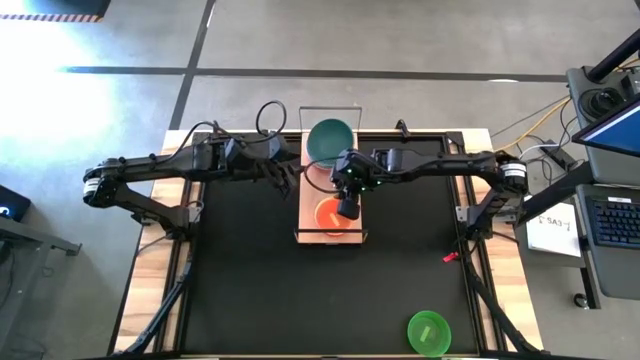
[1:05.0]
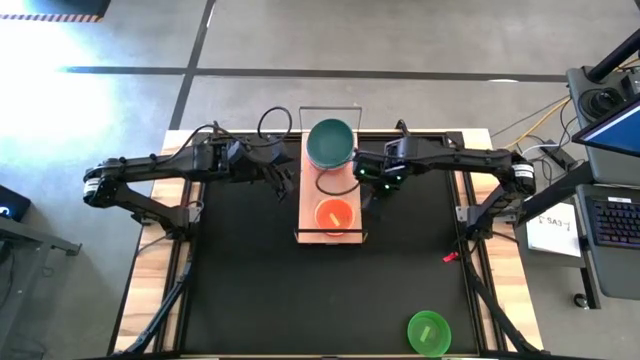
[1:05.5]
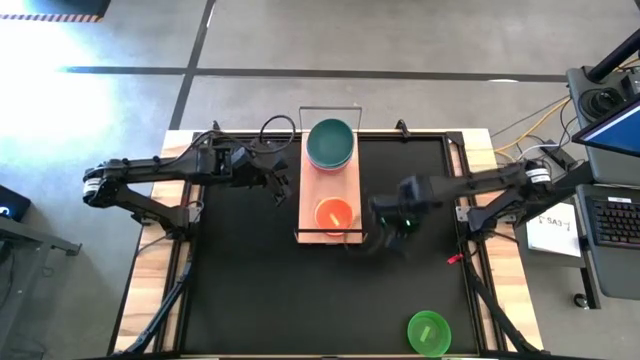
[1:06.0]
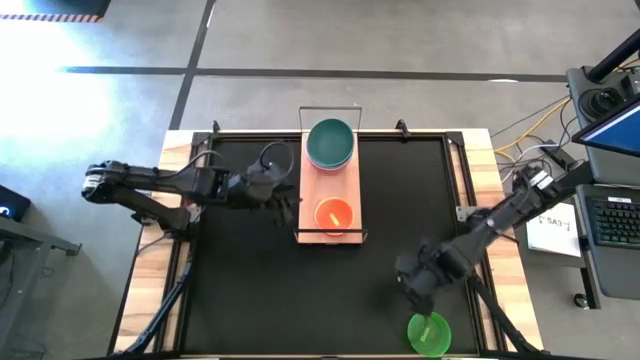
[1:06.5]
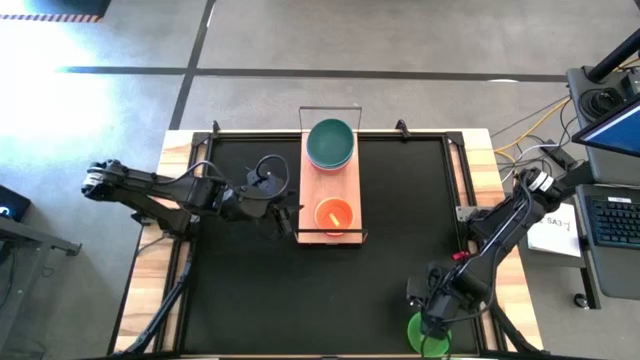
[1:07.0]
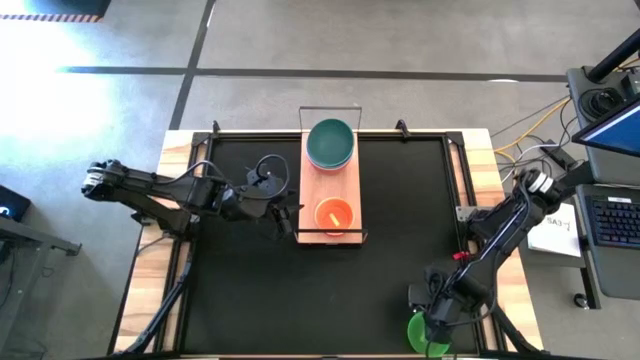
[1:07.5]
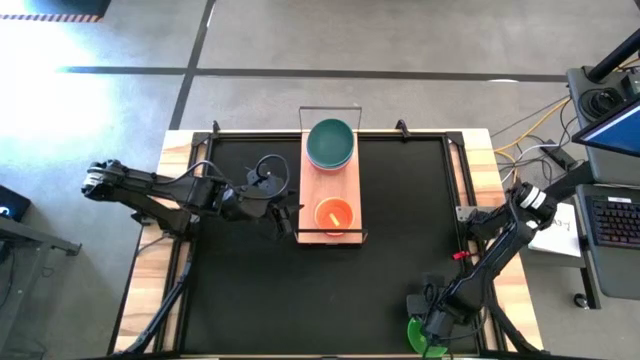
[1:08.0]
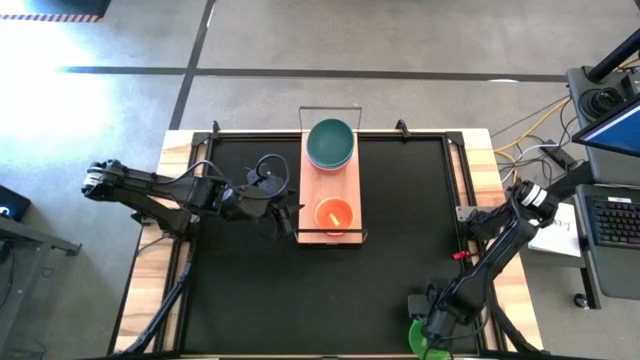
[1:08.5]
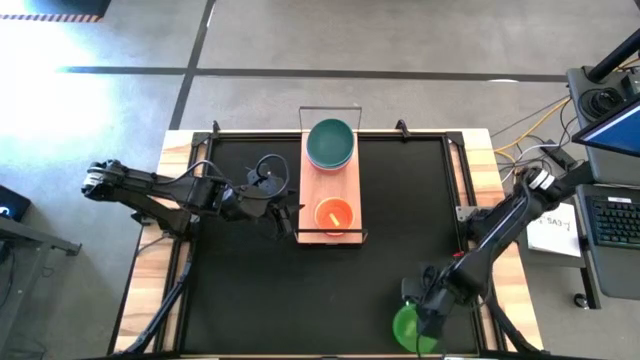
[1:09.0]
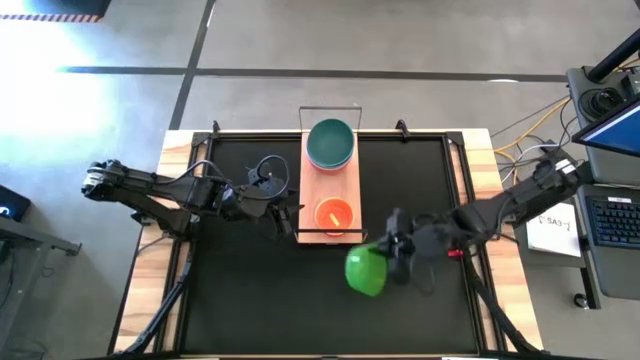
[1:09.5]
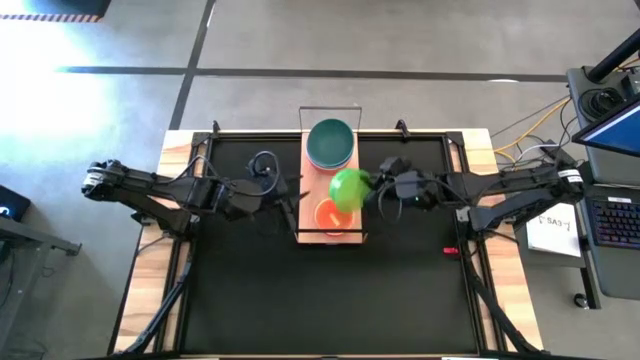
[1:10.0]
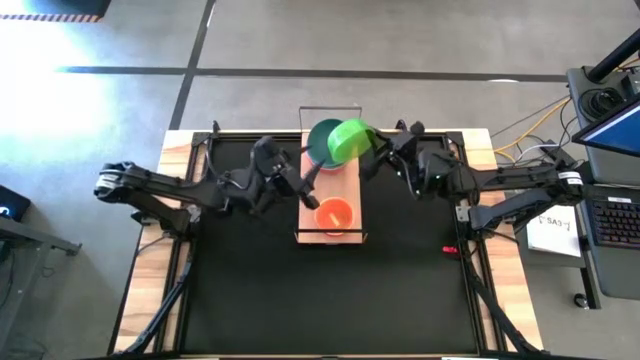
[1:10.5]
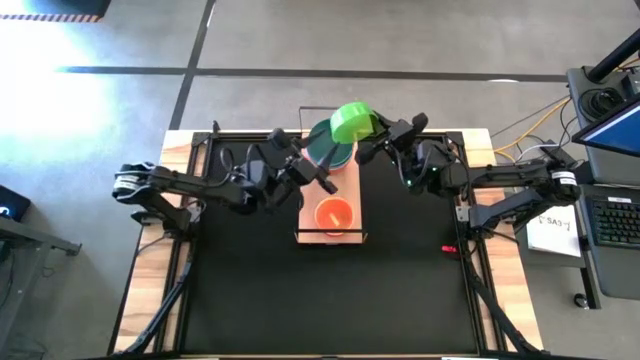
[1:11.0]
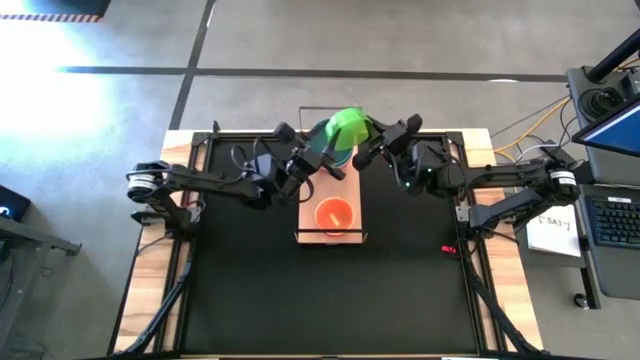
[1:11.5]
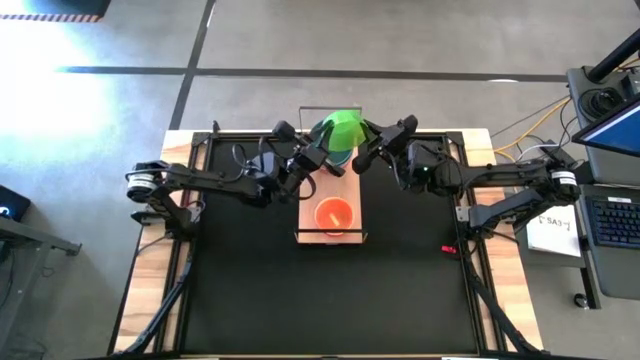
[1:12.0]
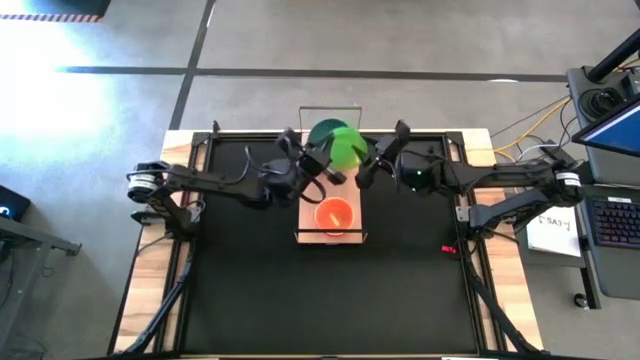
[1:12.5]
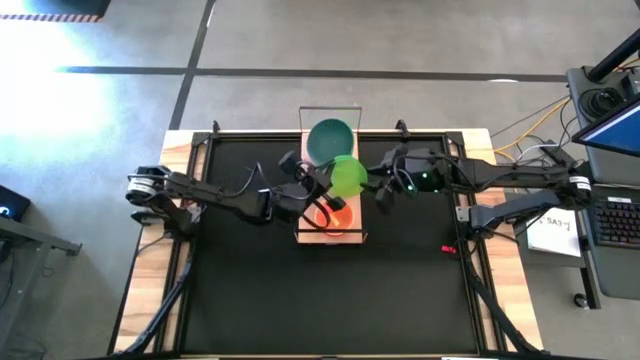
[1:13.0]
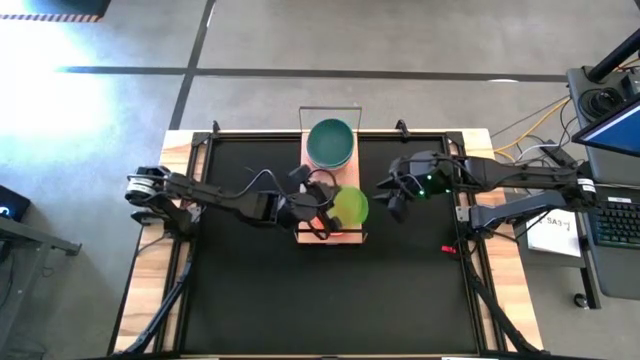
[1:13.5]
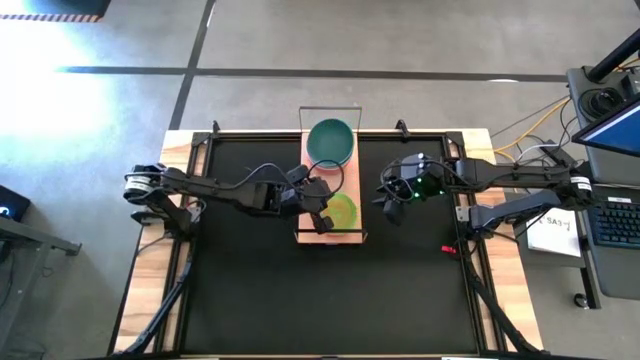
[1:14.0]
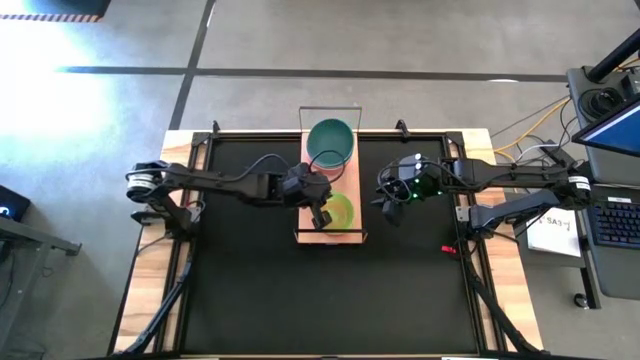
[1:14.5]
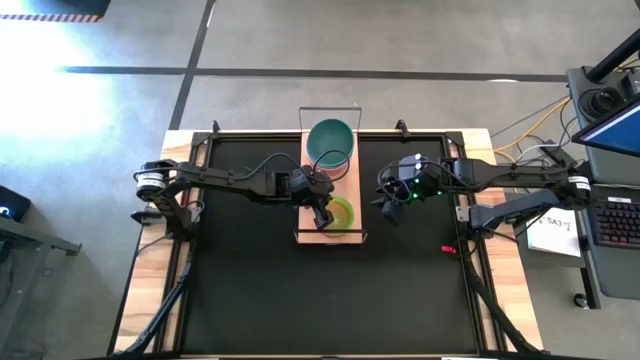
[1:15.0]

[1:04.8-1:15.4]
Task: Place and stack bowls onto a shelf
Stack the small green bowl on top of the small yellow bowl on the shelf

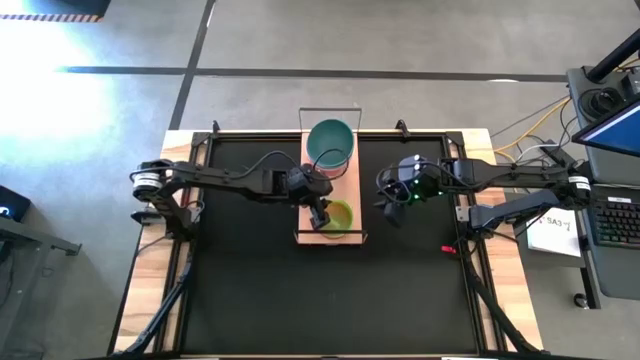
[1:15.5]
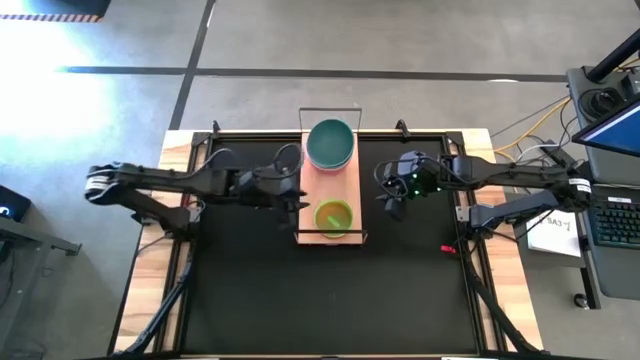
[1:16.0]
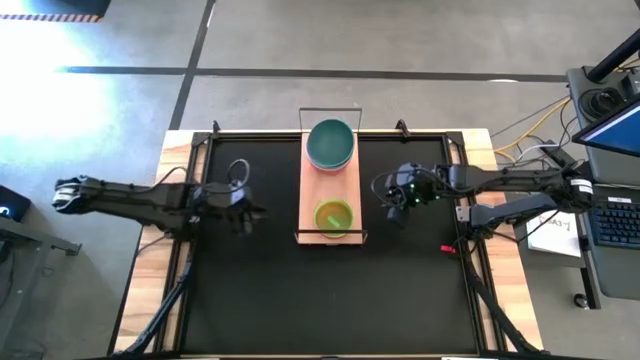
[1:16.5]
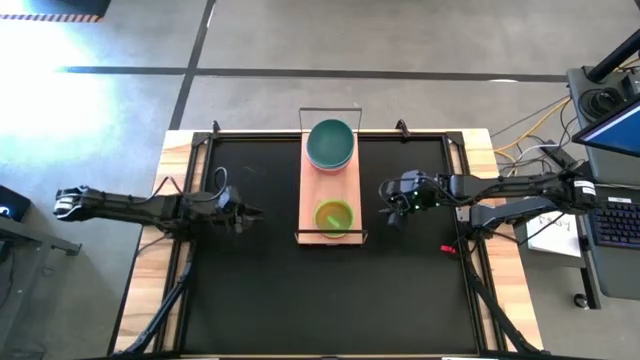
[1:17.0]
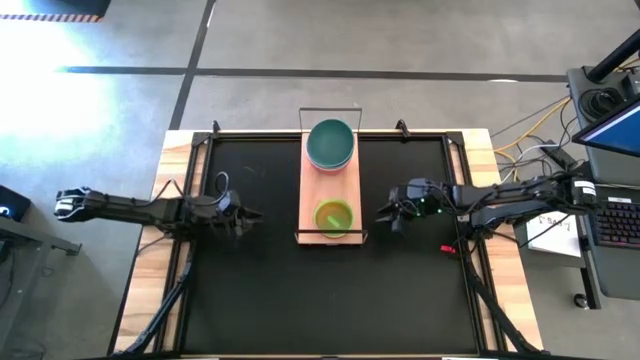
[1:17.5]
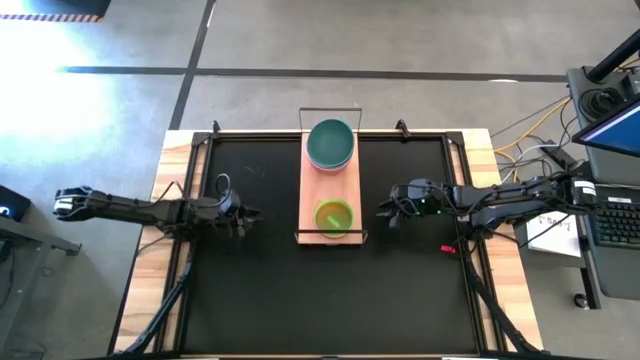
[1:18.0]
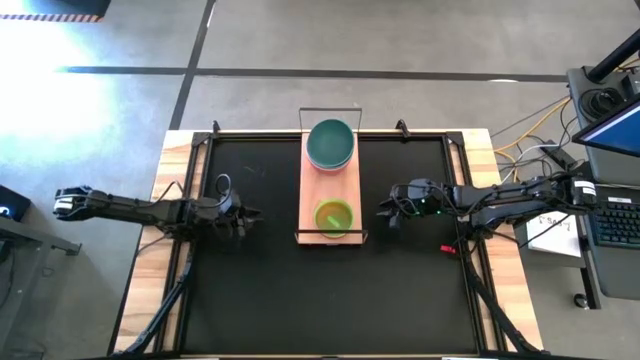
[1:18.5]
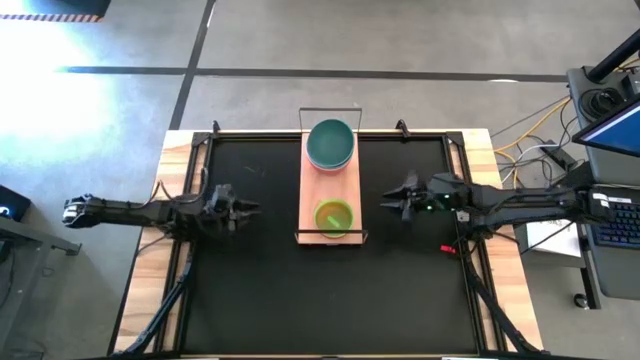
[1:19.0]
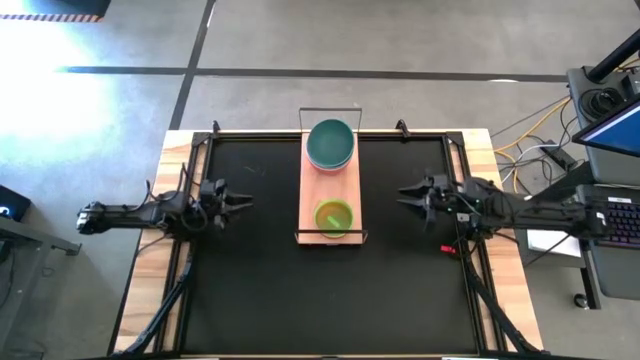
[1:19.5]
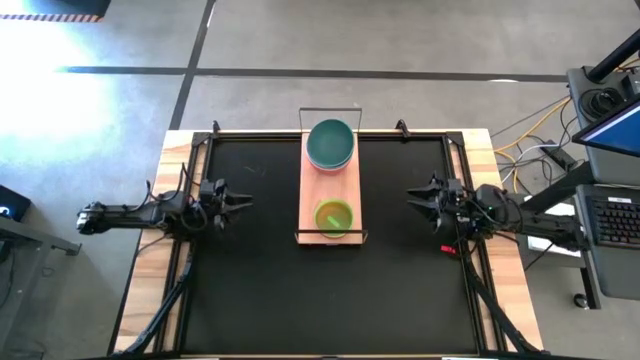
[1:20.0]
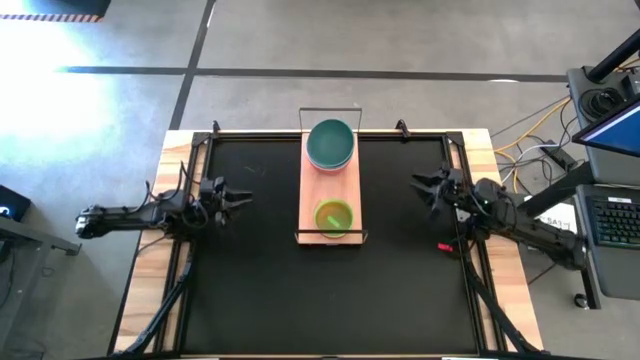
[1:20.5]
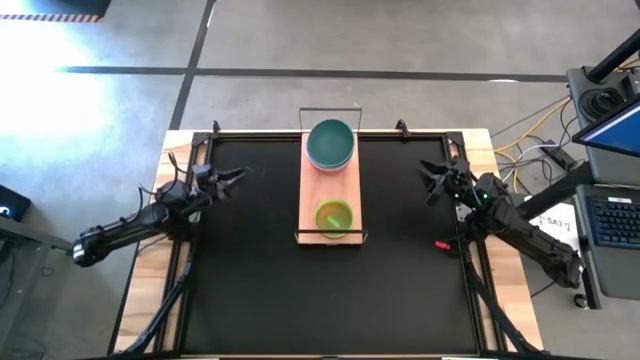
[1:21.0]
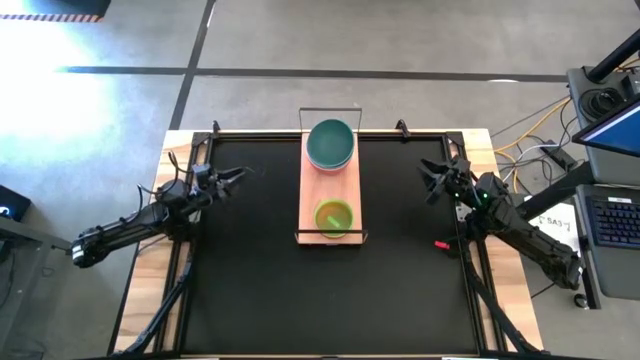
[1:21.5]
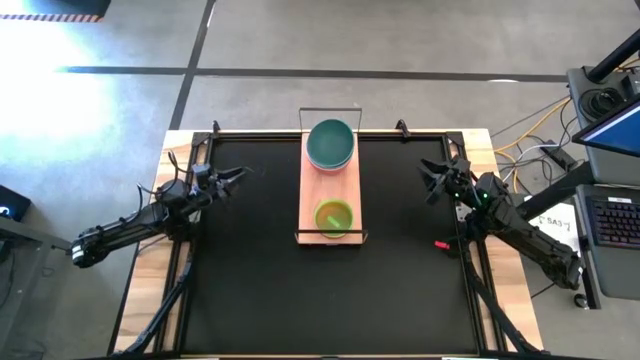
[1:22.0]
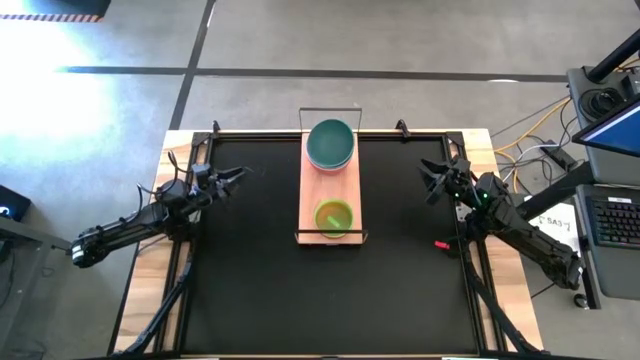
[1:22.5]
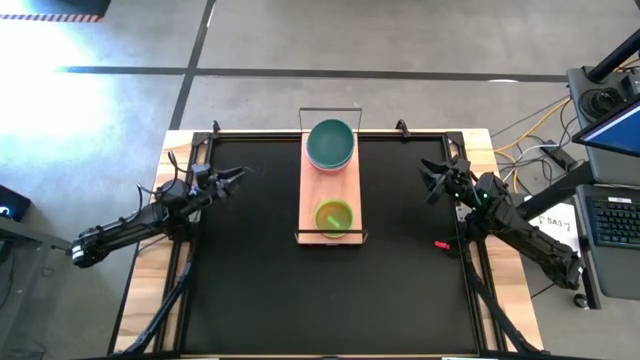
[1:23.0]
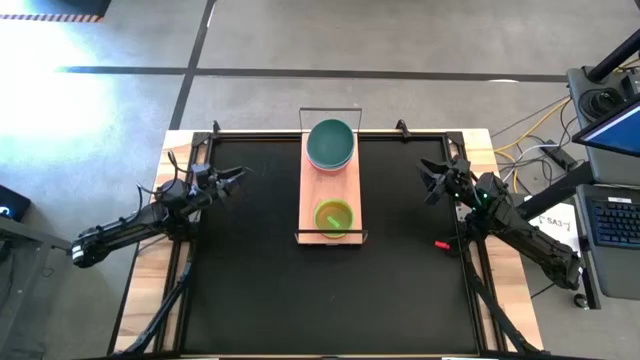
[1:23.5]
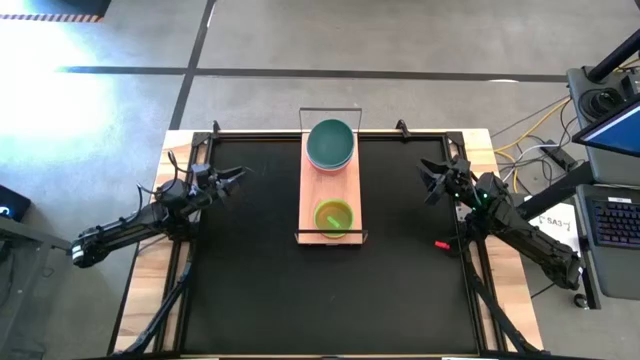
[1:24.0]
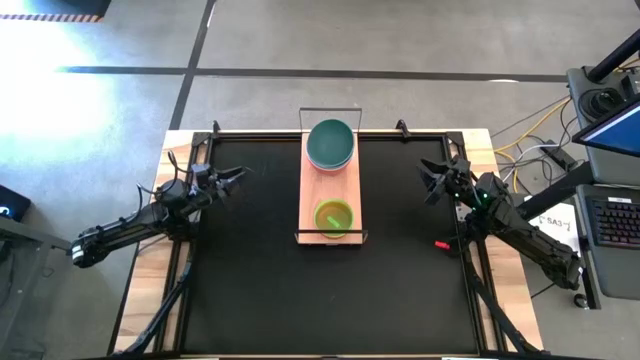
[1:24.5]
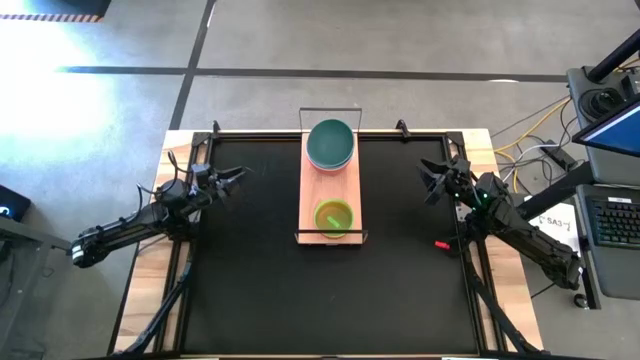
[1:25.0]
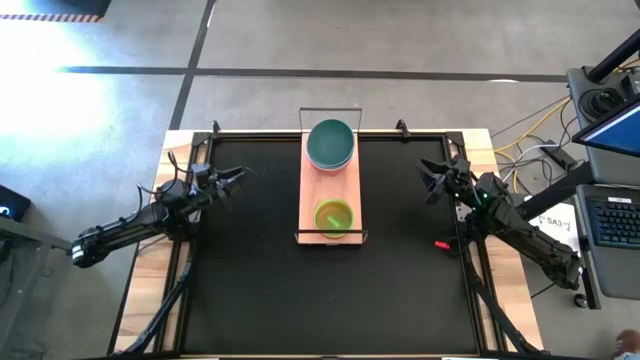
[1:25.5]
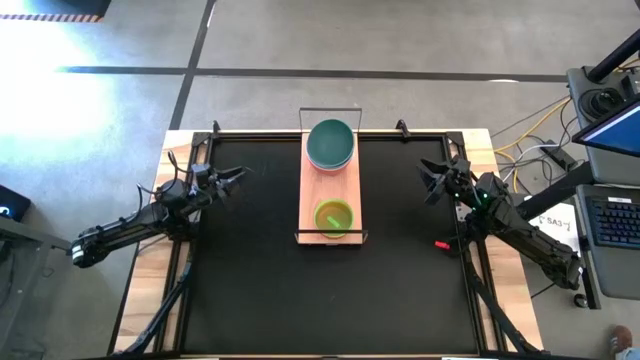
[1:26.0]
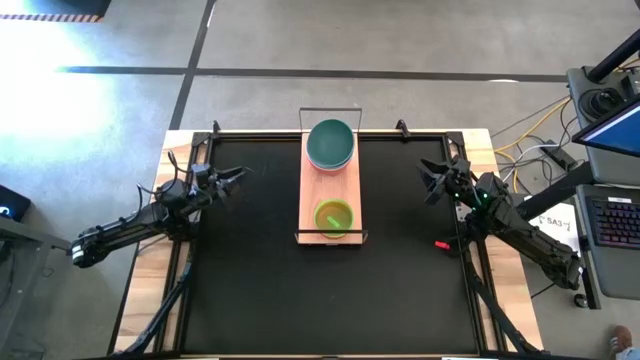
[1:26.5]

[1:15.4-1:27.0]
Return to Home Position
